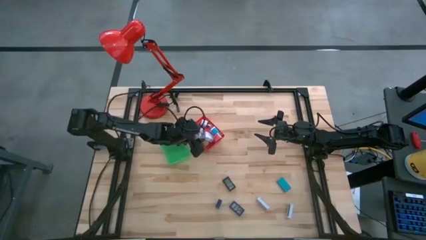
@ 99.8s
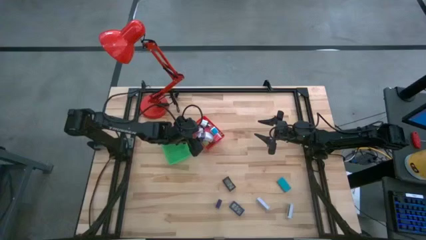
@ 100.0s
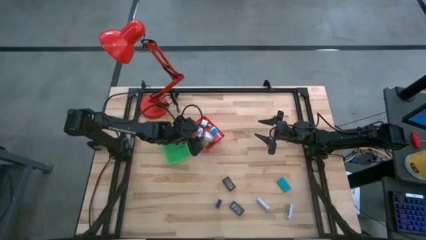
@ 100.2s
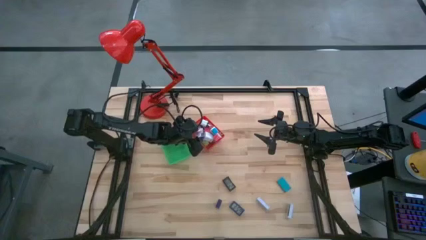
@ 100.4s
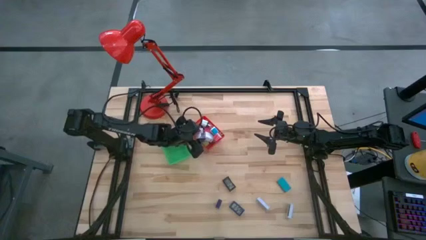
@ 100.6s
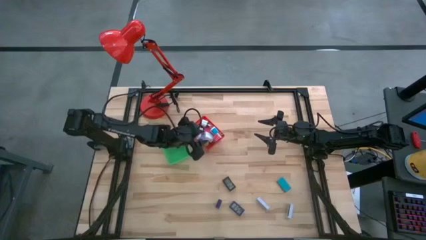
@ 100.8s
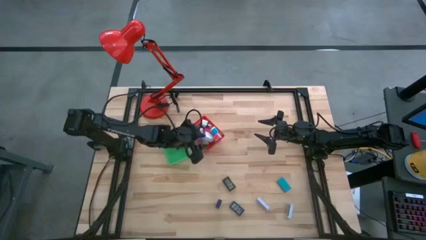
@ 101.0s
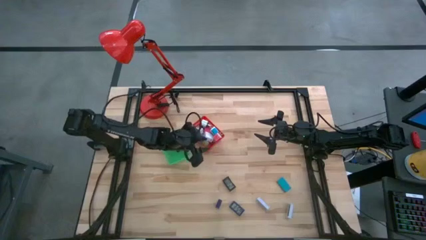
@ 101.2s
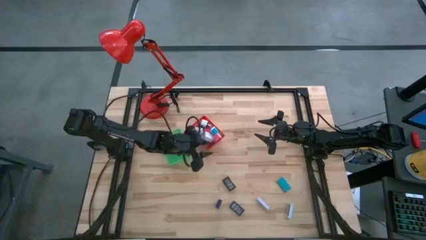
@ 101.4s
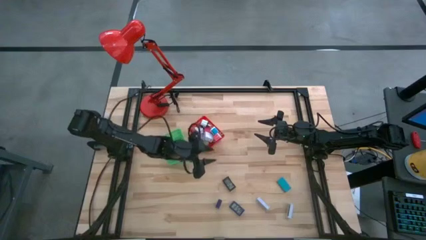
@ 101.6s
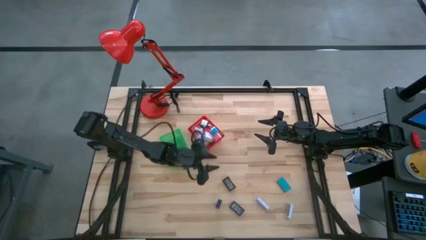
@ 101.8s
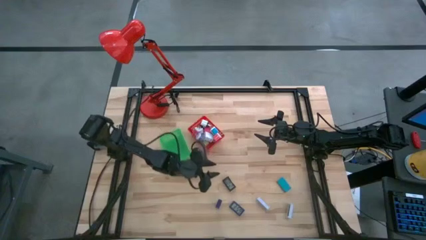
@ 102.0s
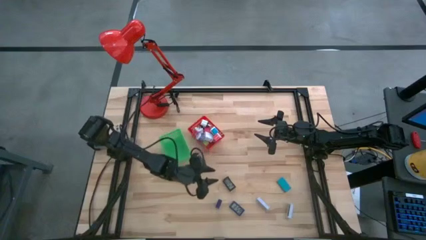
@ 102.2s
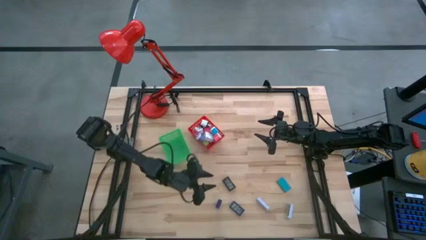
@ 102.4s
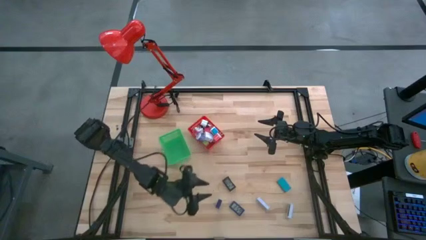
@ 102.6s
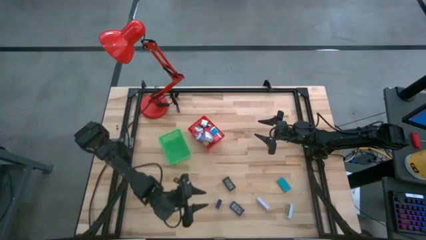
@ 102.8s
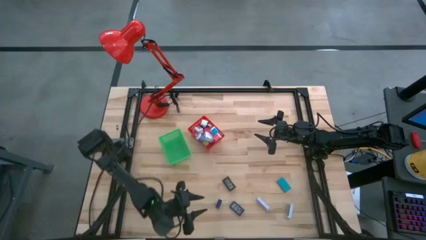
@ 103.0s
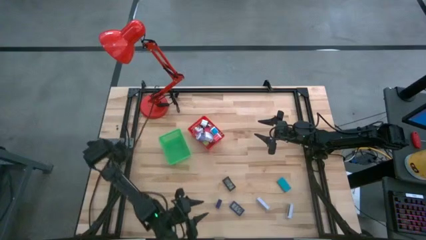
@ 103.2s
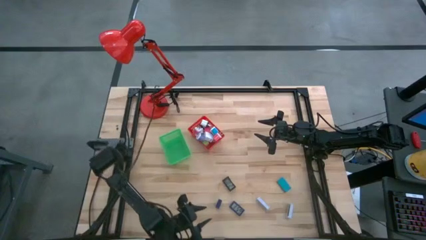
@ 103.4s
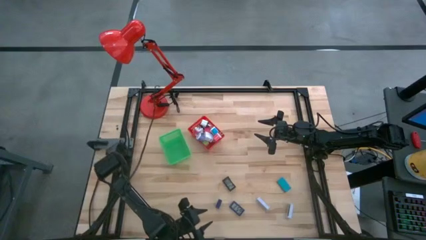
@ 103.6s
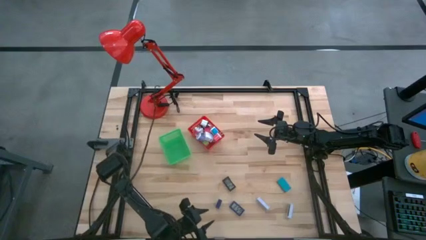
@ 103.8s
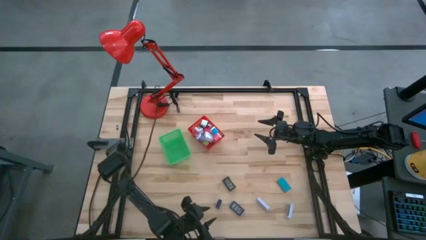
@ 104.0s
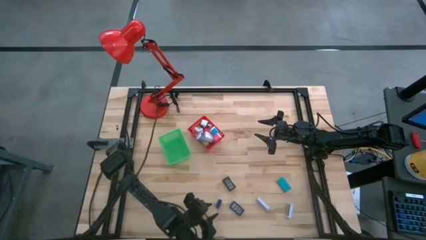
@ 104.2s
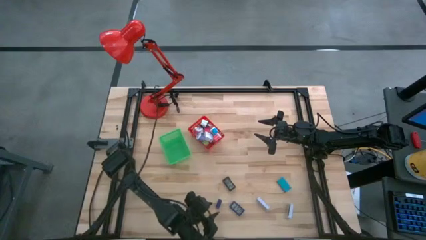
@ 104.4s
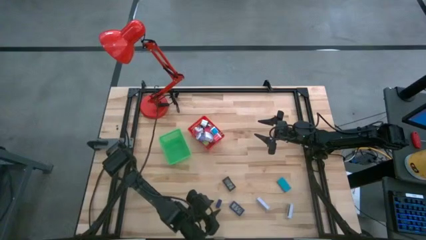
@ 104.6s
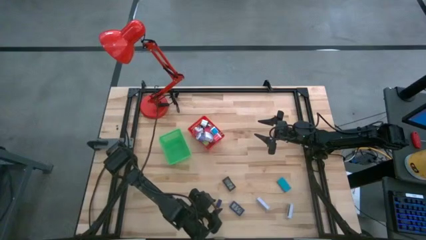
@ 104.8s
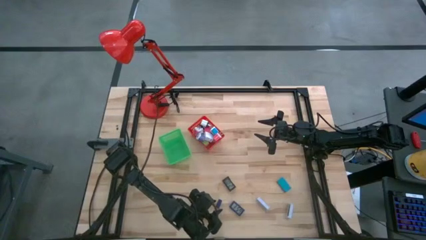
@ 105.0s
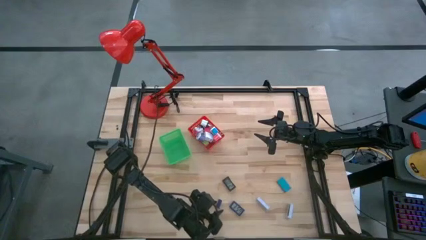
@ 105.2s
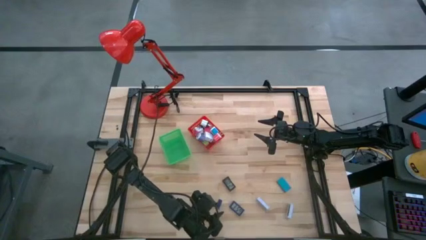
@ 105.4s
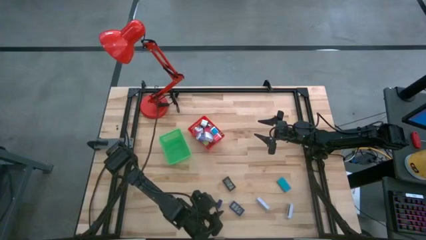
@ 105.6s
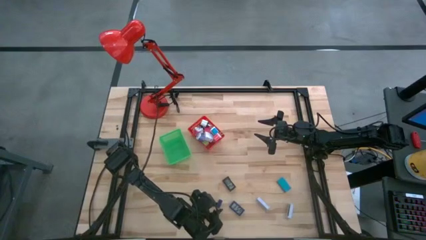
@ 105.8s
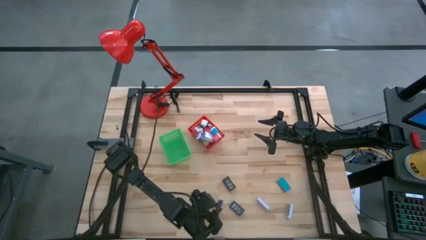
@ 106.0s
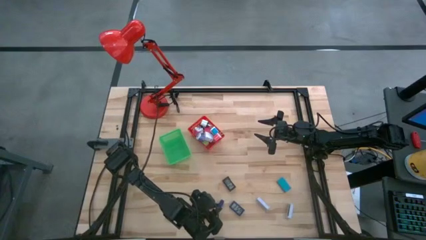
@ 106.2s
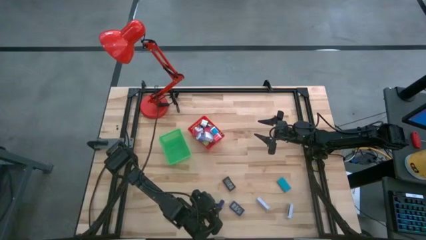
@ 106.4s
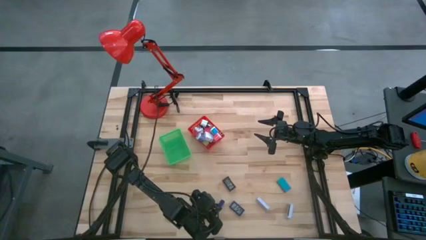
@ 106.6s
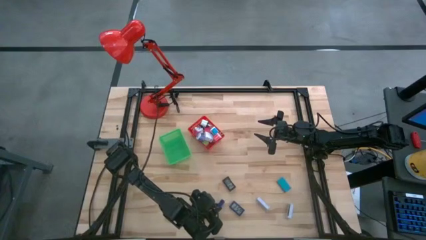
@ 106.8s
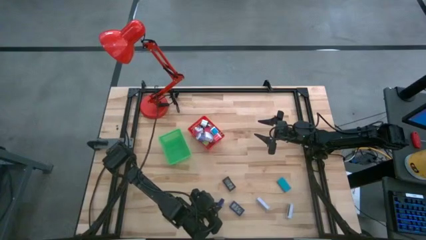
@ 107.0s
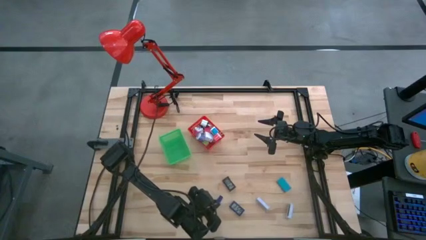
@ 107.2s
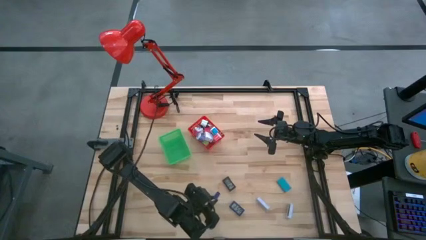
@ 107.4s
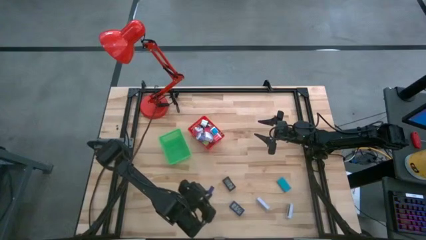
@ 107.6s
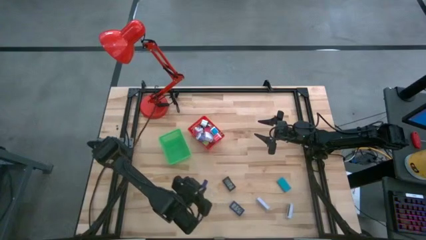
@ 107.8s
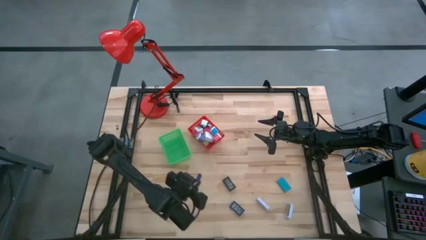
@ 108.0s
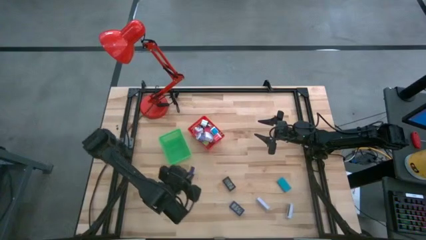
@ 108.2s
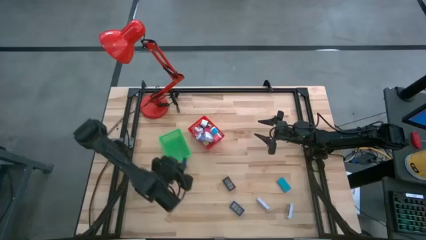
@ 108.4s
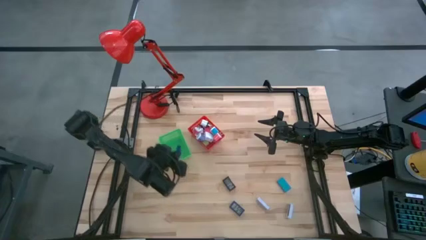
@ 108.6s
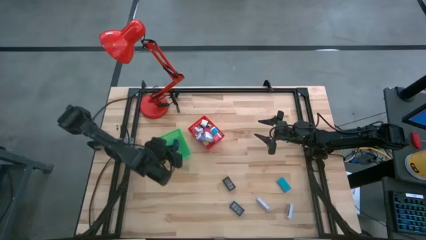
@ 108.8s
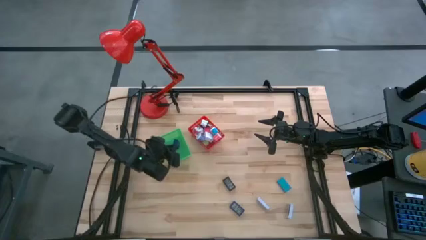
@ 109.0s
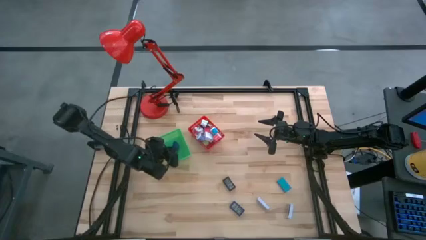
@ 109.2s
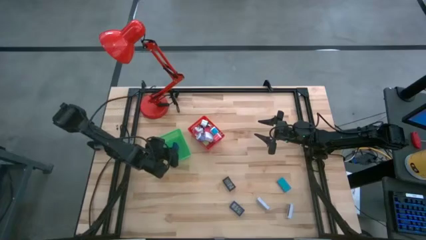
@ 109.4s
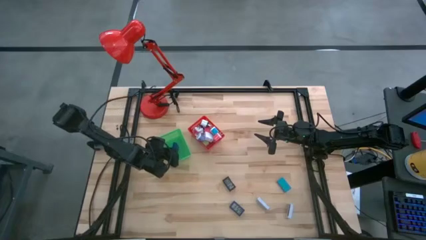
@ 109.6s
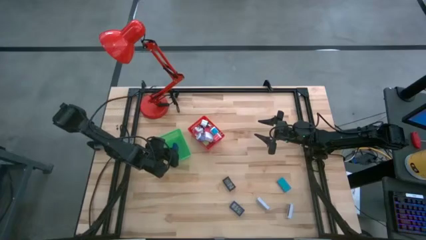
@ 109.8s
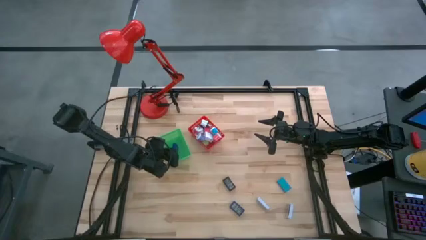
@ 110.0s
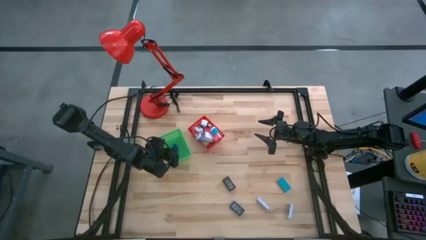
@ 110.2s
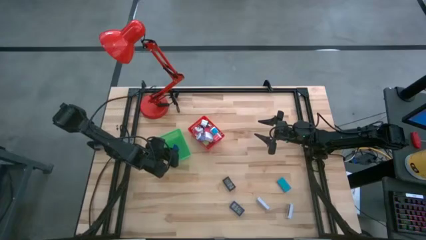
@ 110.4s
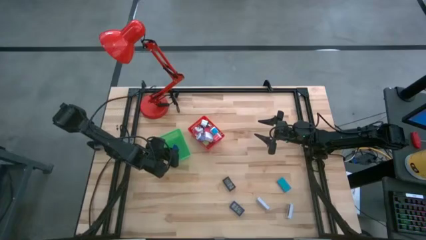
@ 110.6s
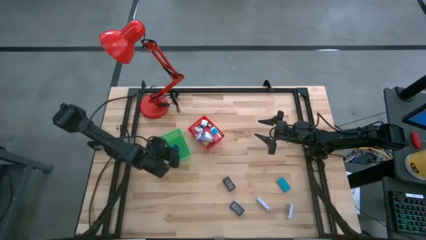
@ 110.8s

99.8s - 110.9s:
Task: Pick & Place Office items
Put the left blue timer into the green bin

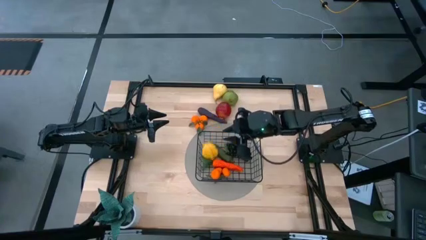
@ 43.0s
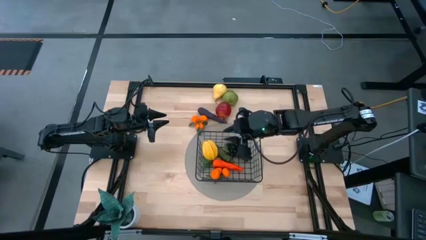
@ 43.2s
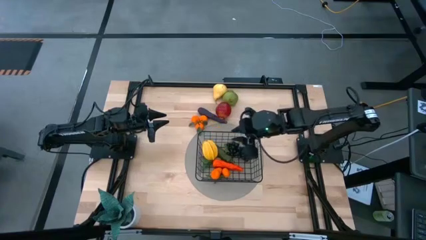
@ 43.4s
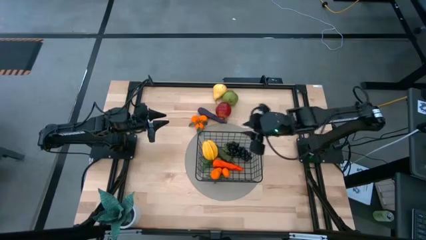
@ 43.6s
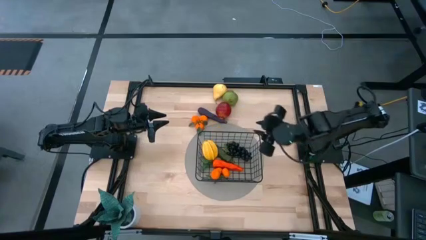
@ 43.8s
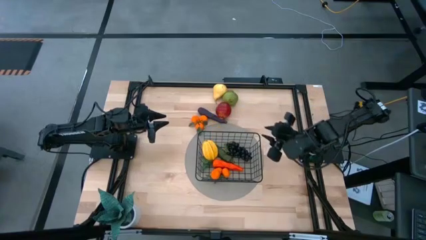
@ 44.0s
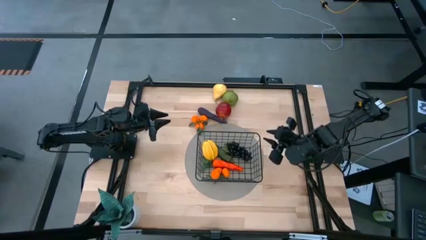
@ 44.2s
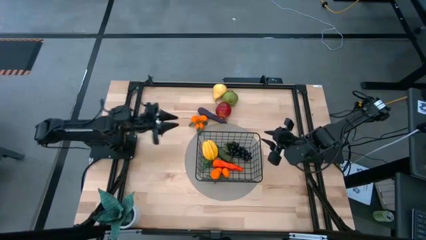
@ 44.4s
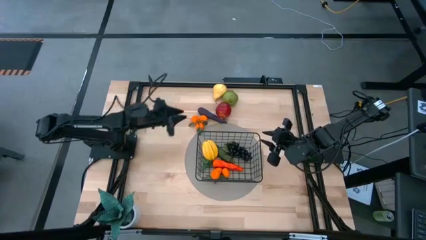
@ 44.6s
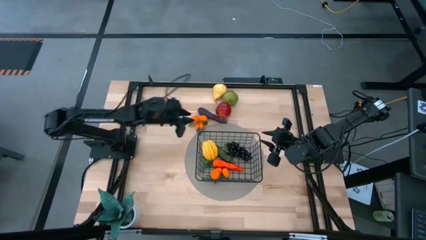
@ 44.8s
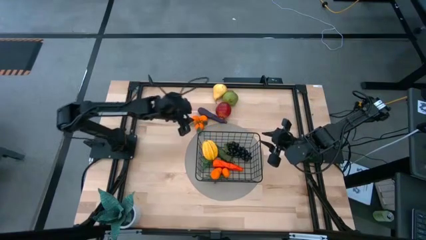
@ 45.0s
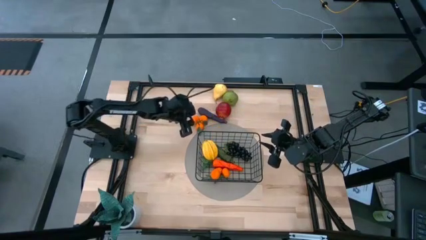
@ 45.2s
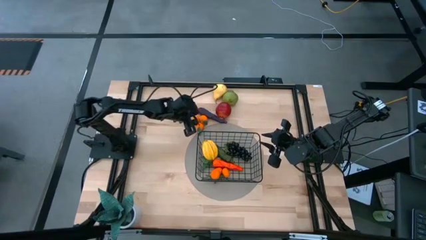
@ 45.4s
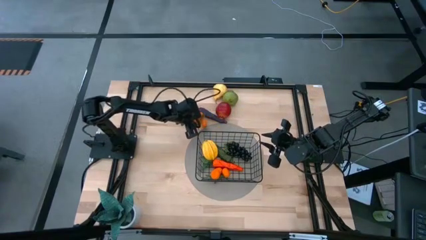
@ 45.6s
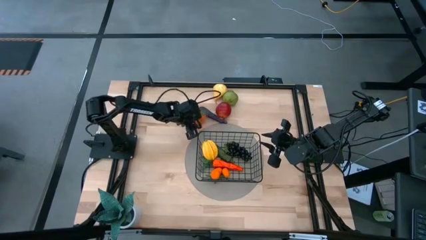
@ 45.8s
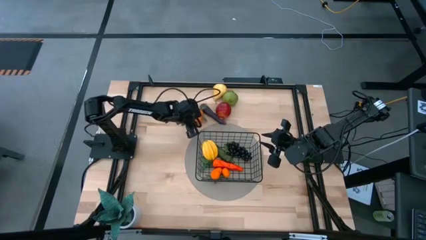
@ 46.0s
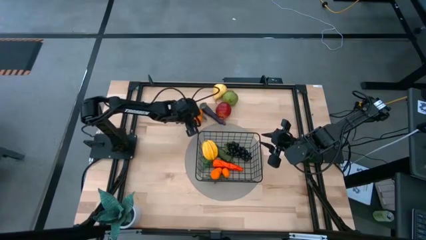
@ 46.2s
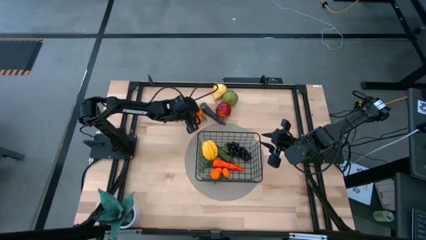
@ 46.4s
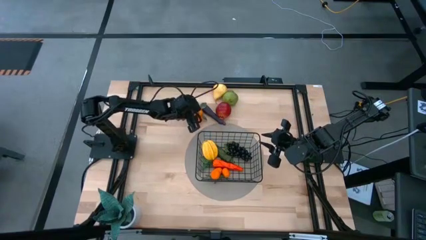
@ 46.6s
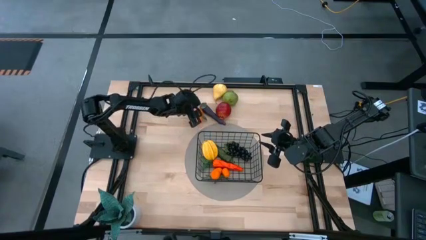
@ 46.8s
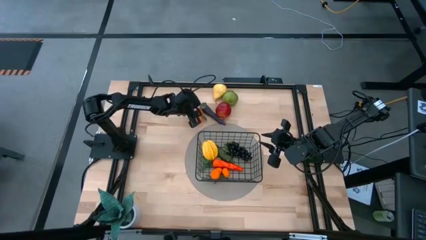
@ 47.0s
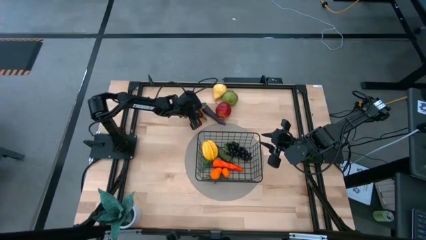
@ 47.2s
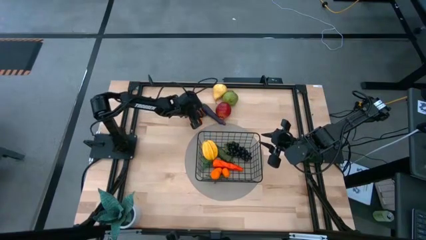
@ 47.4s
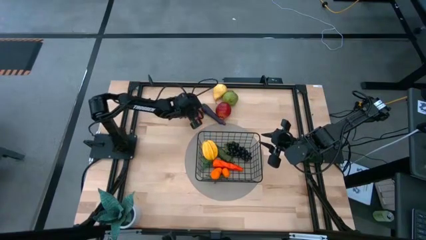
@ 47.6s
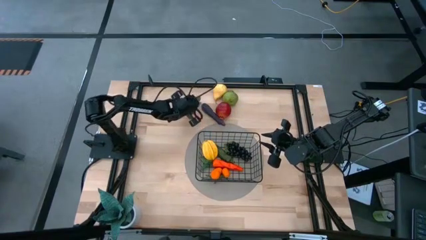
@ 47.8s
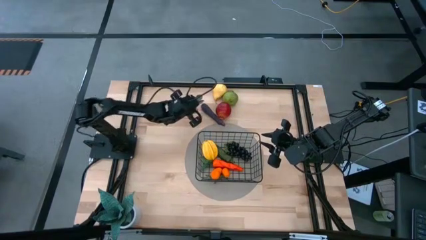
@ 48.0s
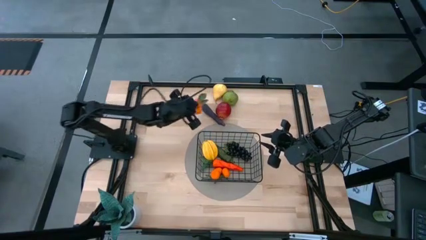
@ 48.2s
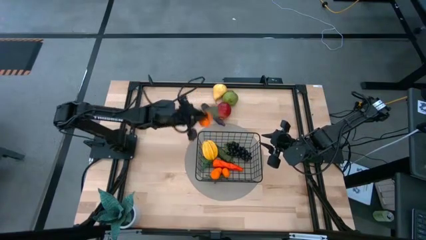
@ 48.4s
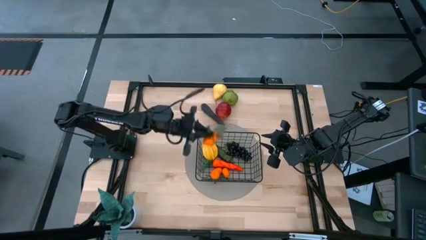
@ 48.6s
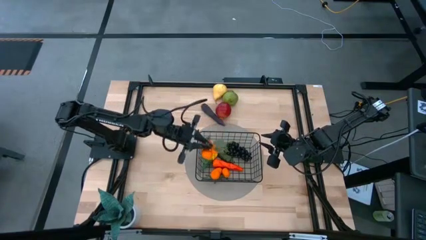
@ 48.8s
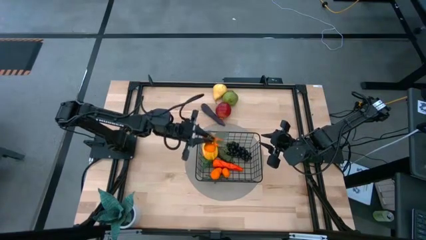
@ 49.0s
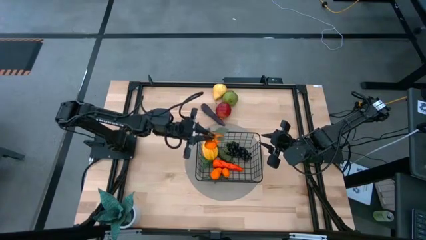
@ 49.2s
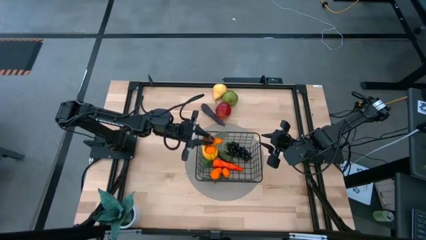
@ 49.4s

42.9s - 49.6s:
Task: Build produce basket
Put the tangerines into the wire basket
